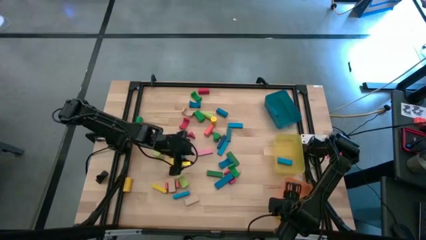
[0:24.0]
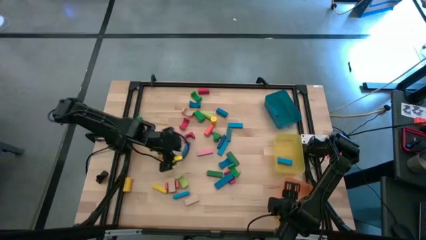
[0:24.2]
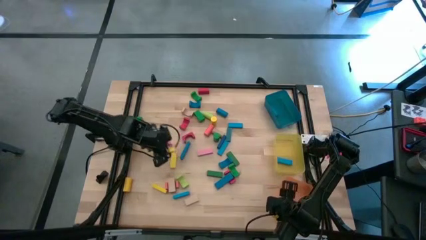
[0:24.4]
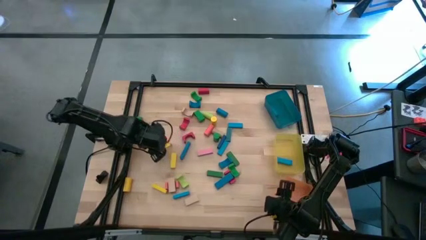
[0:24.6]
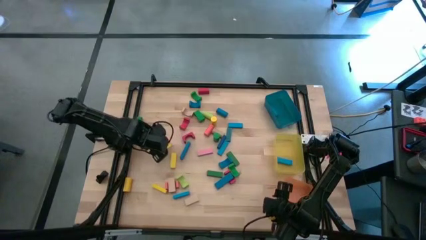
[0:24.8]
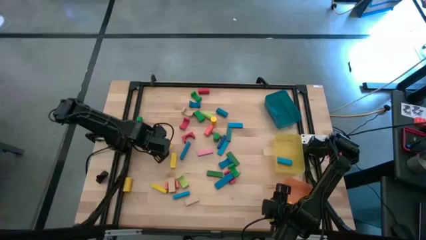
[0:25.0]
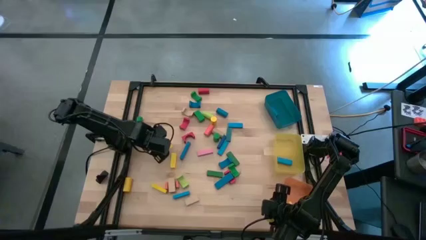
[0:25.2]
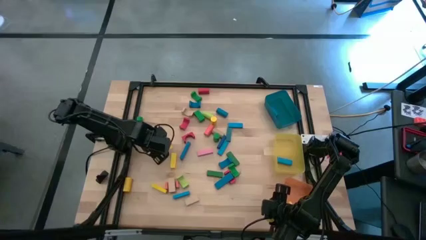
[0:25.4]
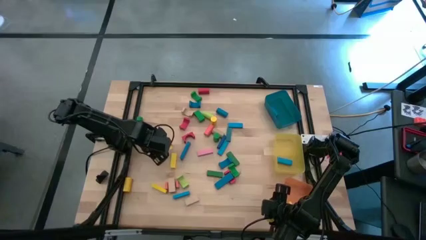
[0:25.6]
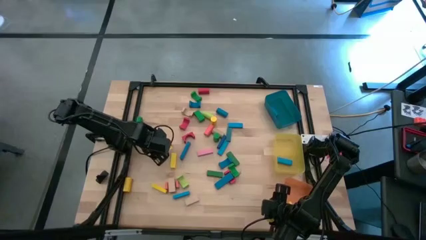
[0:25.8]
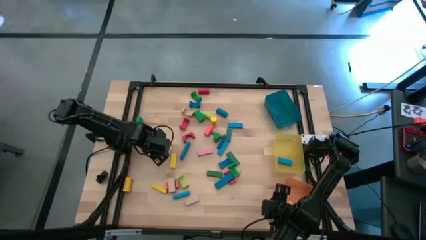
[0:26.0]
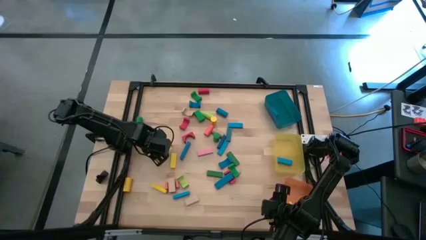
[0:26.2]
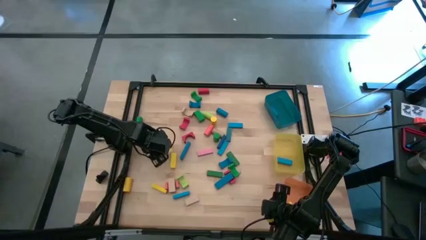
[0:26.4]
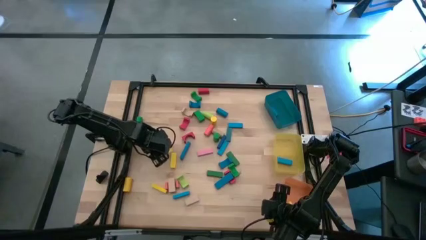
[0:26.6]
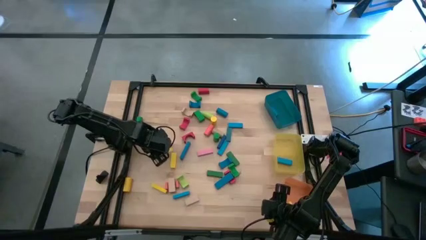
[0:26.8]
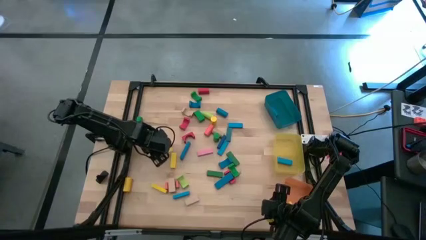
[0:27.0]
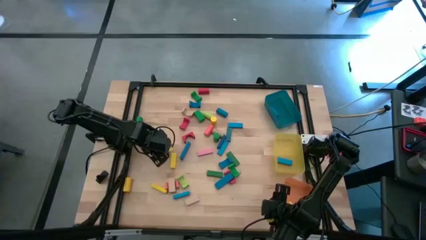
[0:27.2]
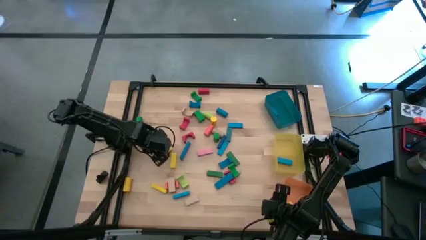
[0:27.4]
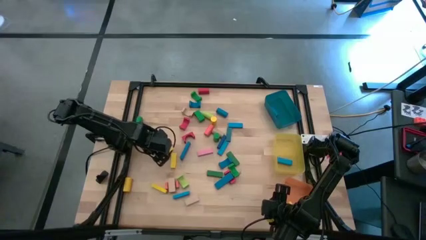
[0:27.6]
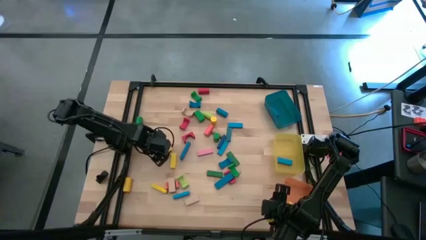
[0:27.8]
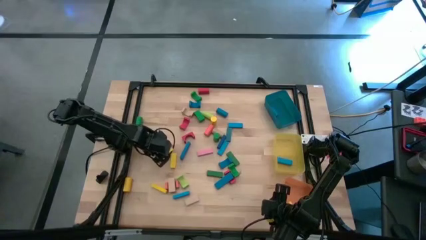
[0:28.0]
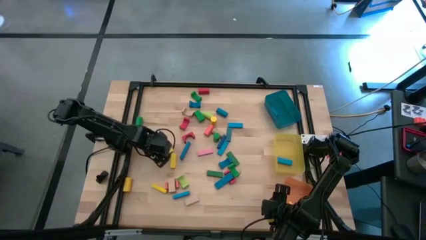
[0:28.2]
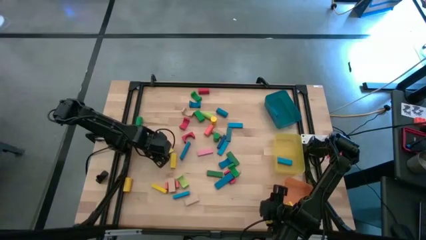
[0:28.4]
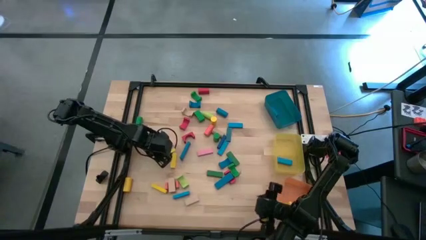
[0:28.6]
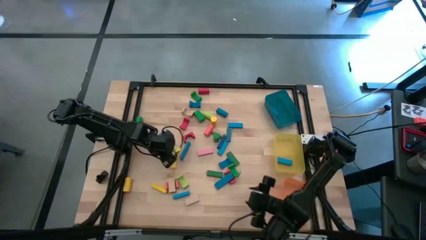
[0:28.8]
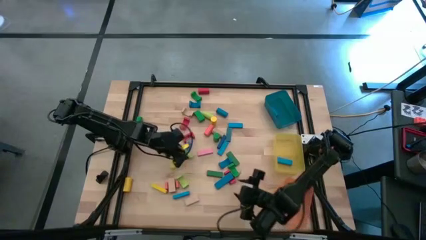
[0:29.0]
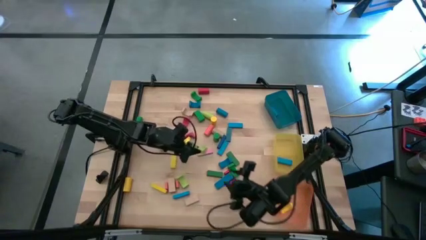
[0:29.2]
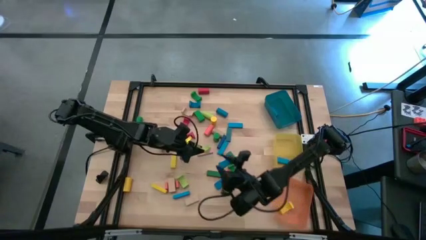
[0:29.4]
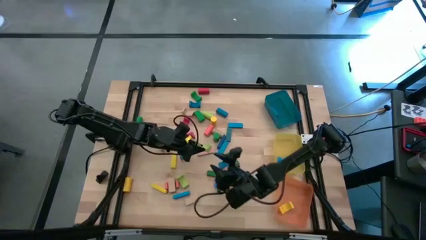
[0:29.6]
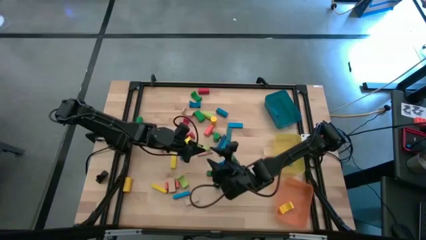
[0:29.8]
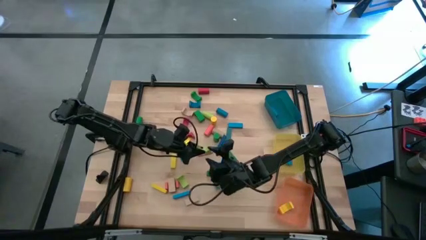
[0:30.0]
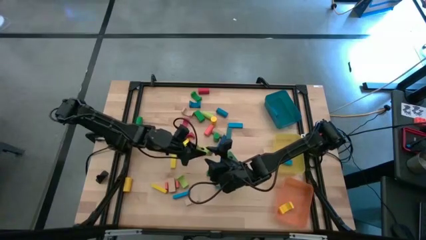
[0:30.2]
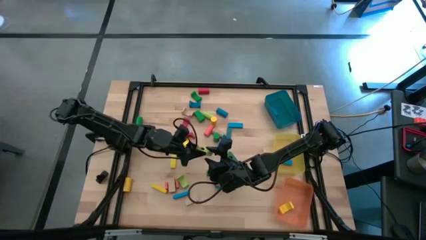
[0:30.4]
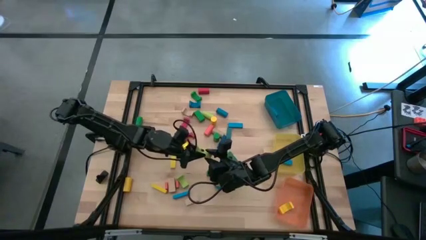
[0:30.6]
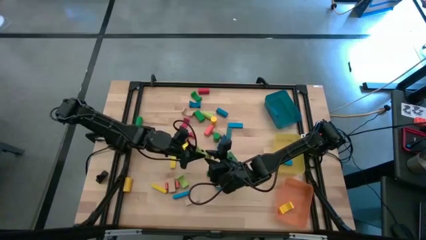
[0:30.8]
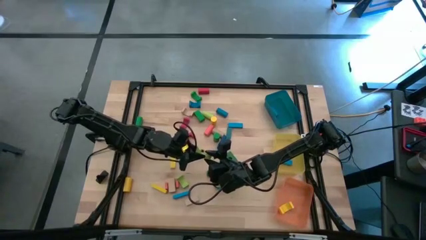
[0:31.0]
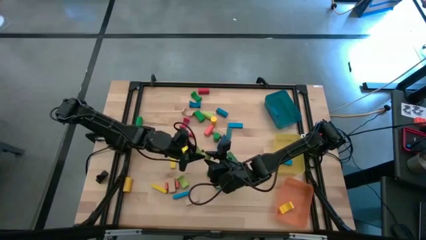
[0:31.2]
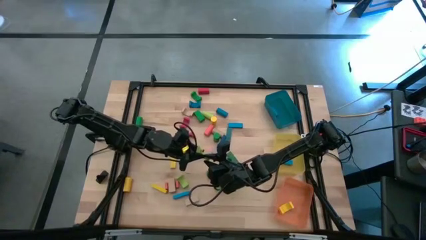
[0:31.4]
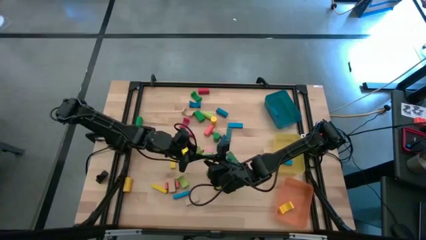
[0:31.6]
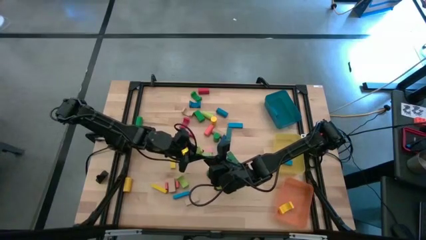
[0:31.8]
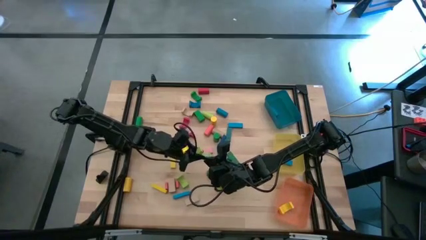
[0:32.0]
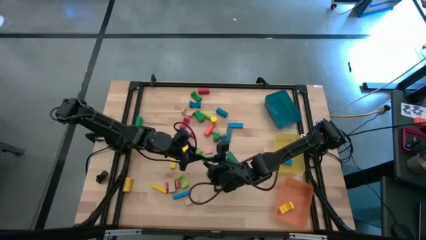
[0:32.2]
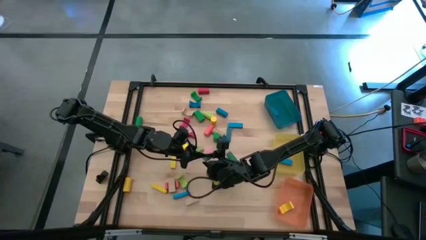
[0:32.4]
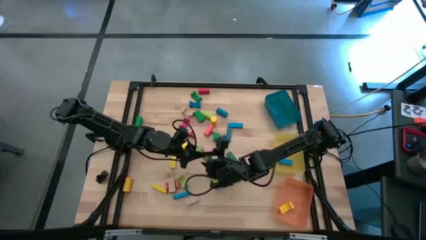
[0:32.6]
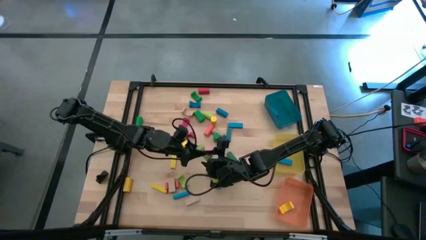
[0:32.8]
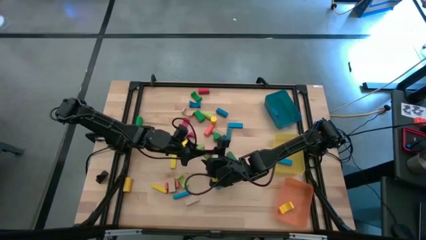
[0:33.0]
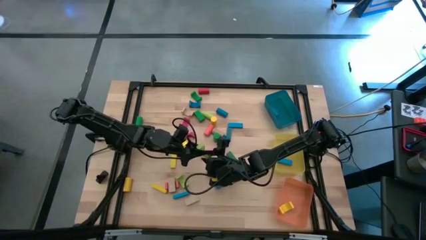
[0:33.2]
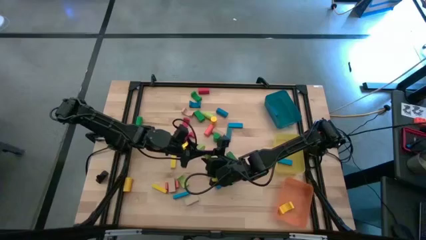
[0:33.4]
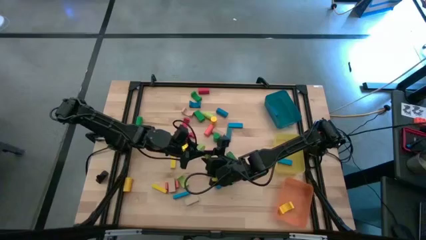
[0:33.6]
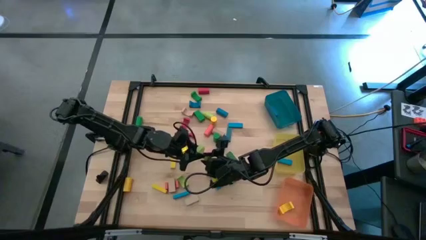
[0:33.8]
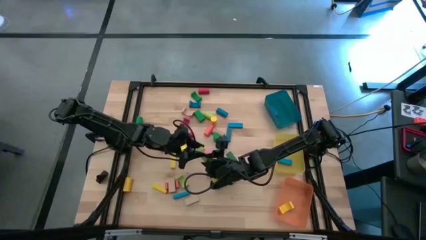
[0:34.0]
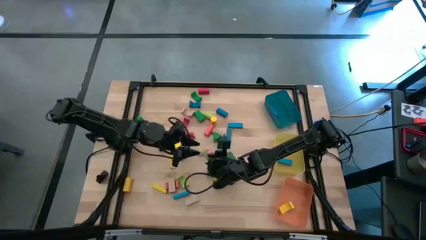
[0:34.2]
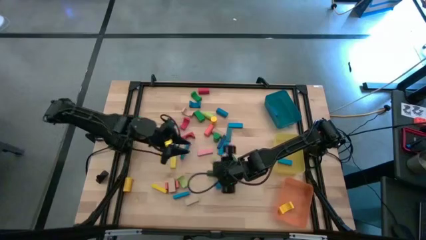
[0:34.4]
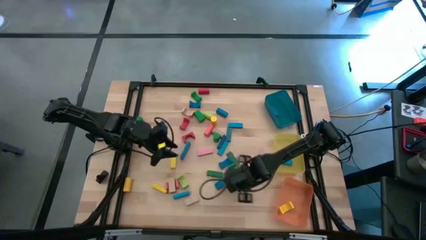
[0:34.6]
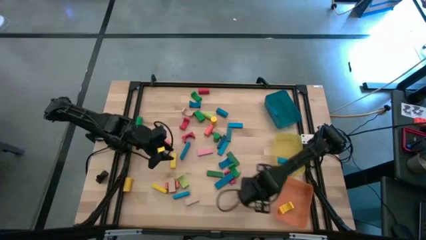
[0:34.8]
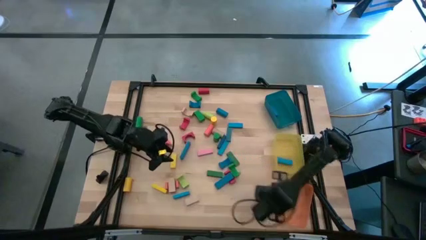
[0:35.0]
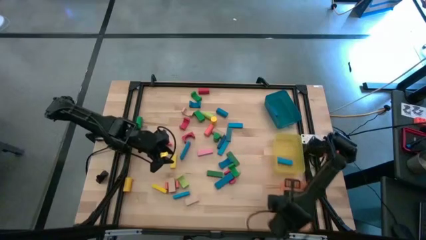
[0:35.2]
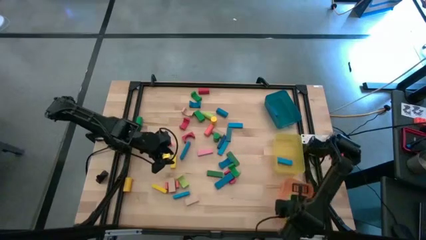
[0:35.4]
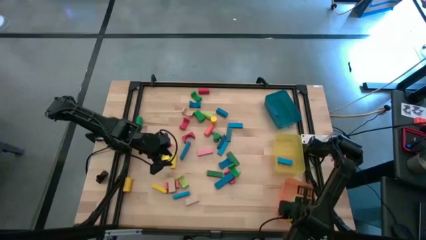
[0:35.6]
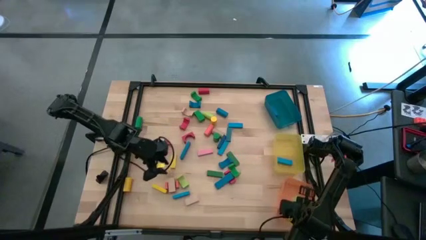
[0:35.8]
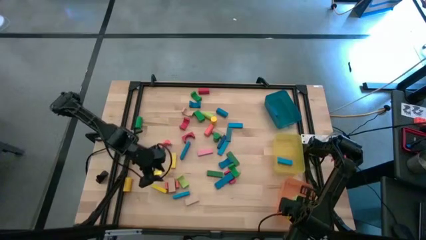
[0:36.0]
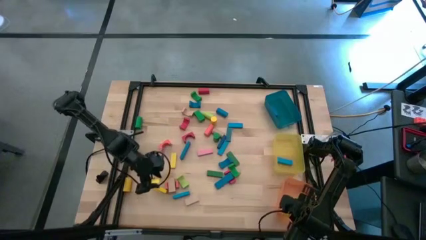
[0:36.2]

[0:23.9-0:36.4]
Task: Sort blocks by size
Put the light green arch block into the orange bin

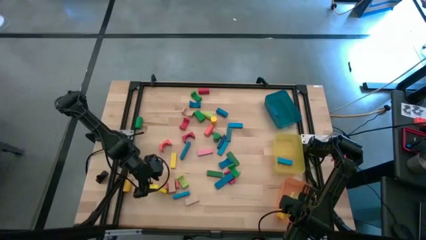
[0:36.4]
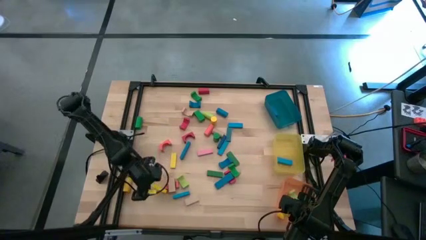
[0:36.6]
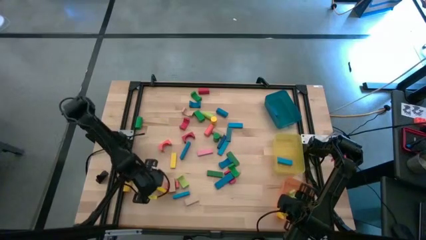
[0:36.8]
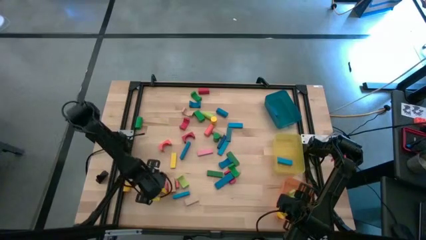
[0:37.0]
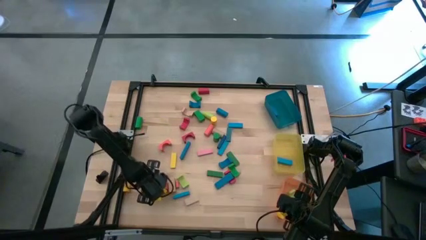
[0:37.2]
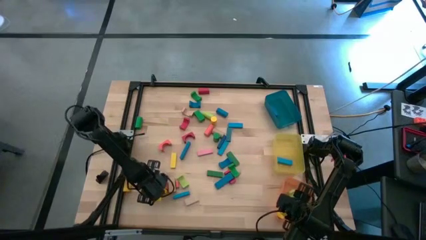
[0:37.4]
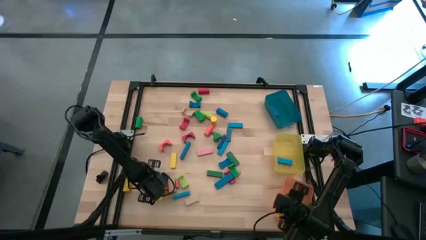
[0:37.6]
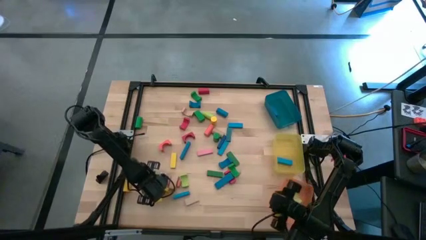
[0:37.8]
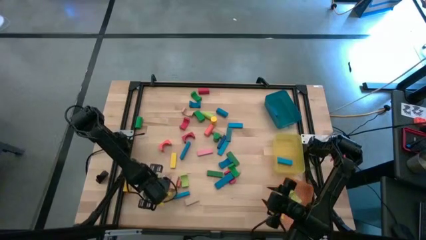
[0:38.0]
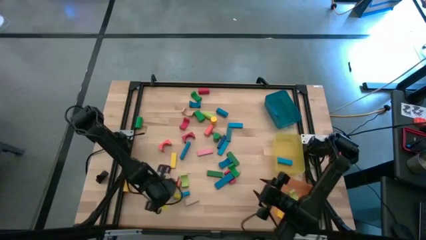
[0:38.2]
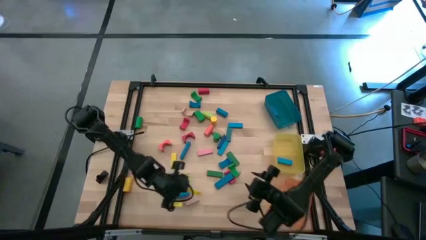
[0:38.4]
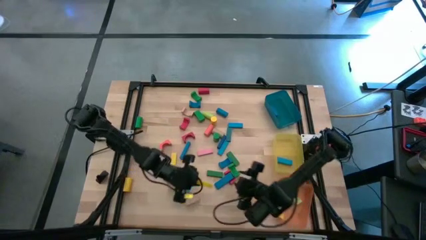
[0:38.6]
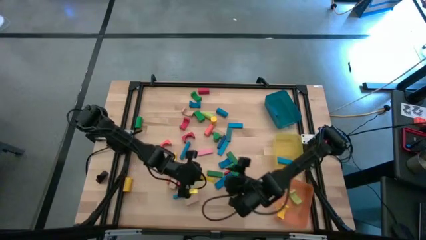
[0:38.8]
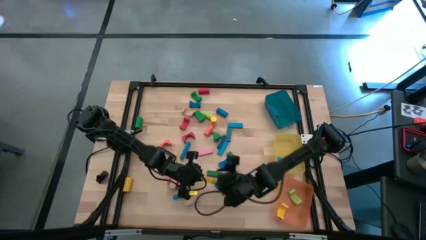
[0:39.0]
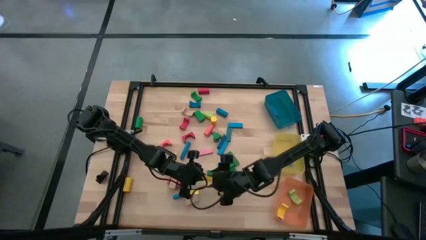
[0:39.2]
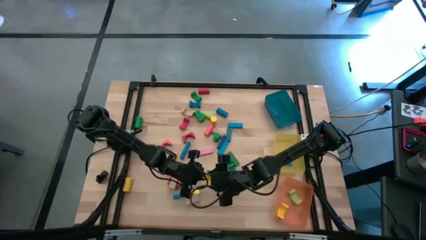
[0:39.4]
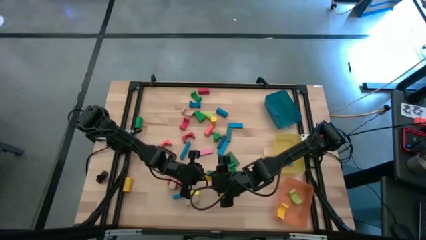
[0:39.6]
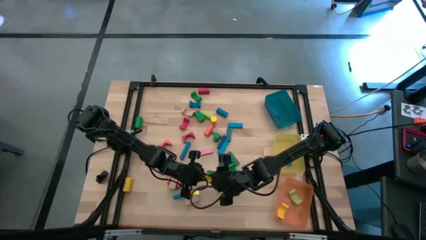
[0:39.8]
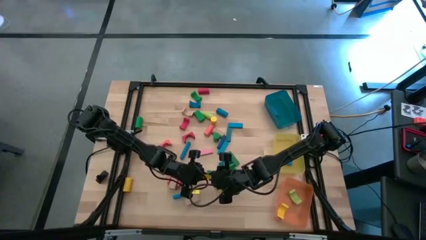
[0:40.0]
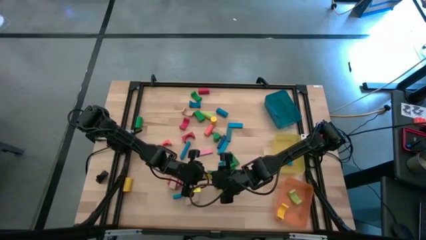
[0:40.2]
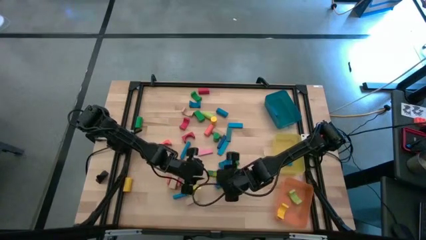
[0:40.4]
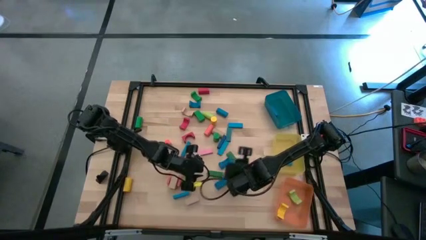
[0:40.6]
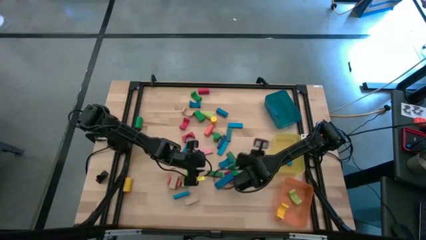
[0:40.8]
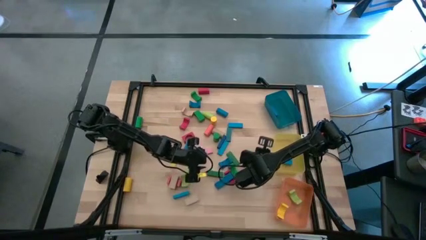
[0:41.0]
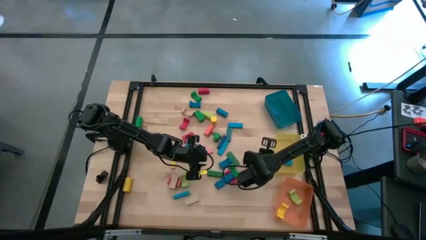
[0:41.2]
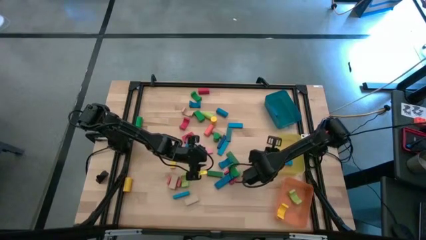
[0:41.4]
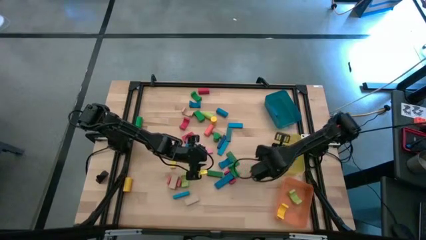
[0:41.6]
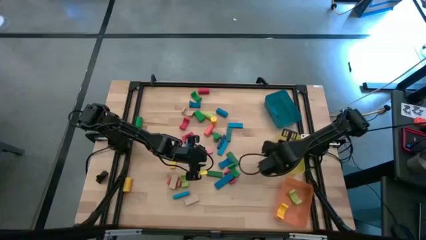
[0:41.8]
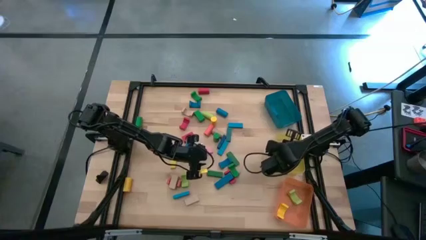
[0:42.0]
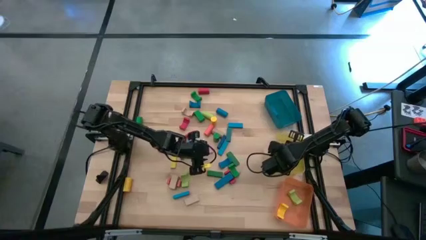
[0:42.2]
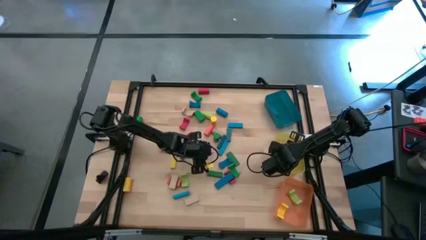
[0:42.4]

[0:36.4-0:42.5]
Put the yellow rectangular block into the yellow bin
